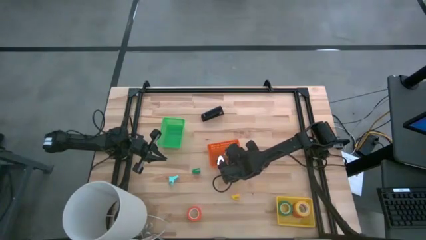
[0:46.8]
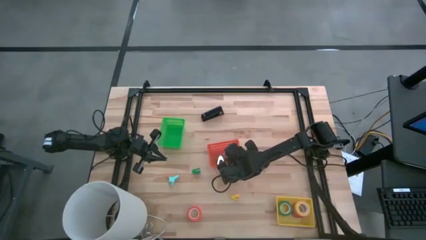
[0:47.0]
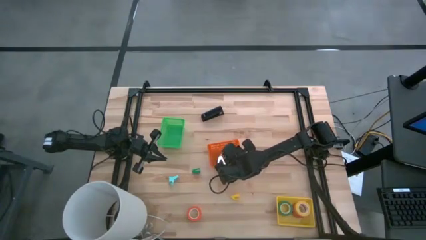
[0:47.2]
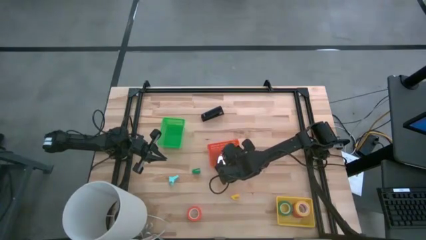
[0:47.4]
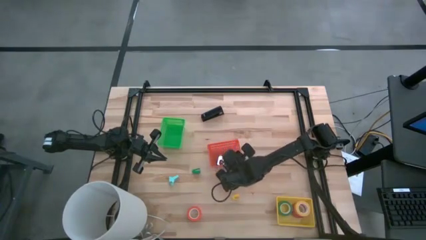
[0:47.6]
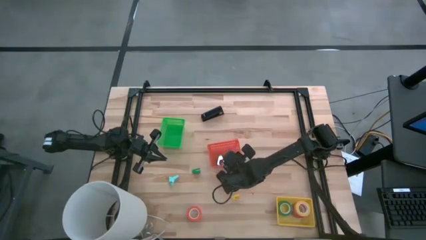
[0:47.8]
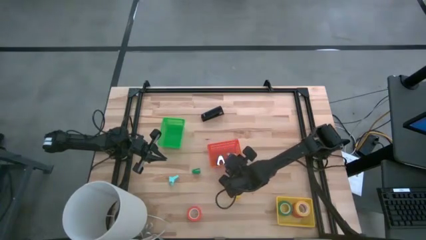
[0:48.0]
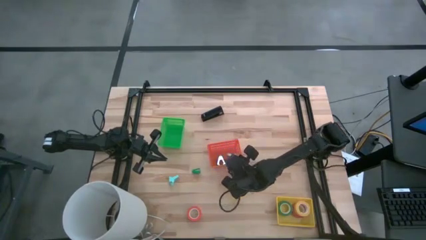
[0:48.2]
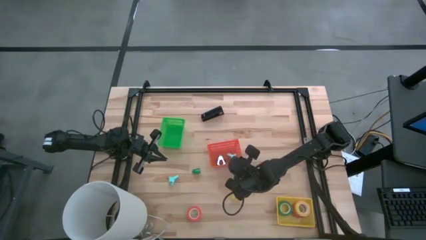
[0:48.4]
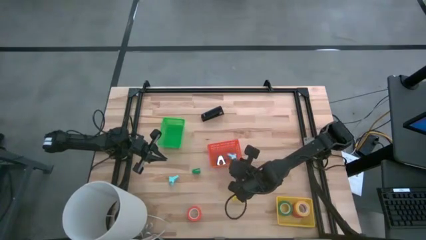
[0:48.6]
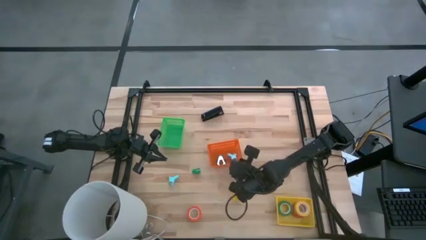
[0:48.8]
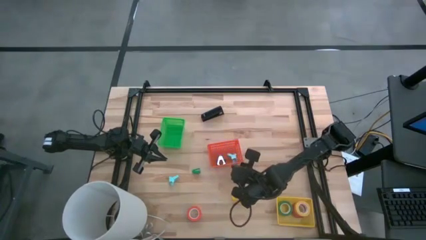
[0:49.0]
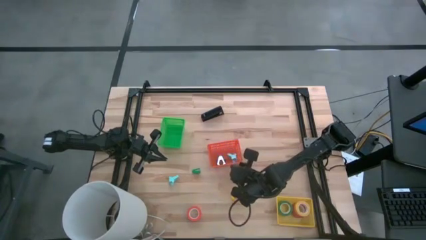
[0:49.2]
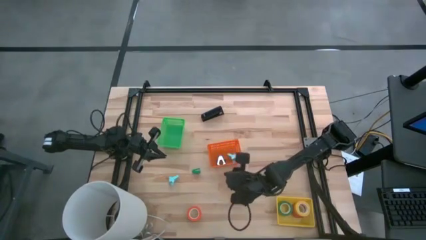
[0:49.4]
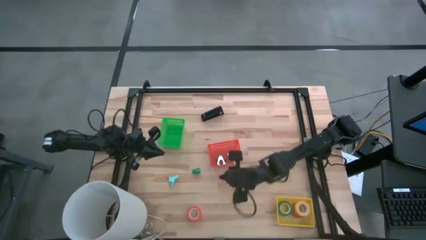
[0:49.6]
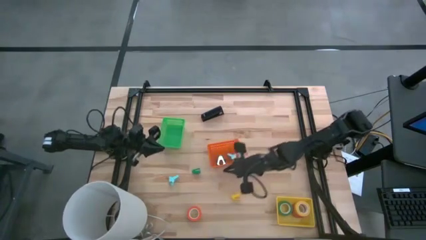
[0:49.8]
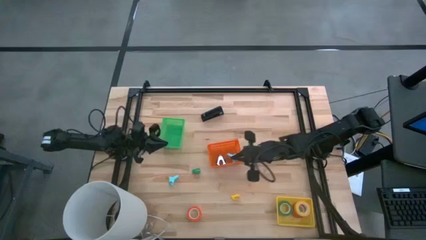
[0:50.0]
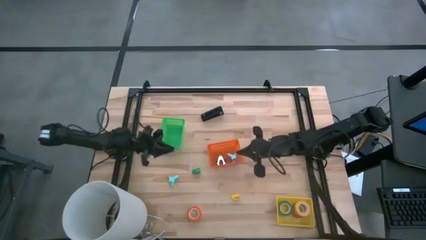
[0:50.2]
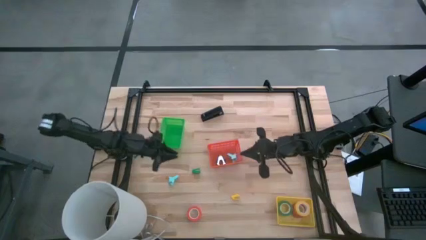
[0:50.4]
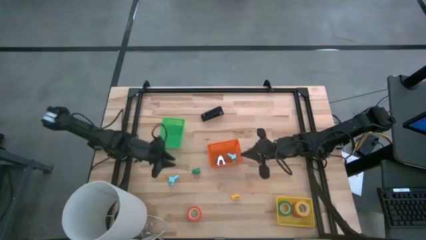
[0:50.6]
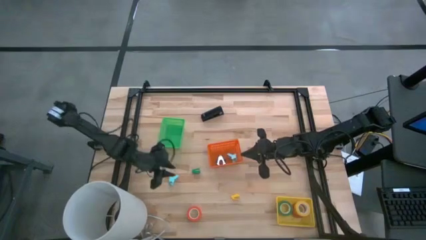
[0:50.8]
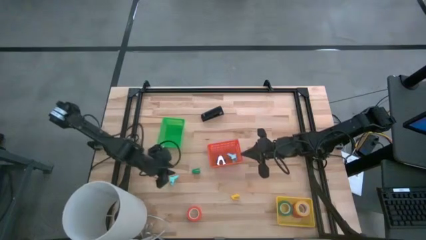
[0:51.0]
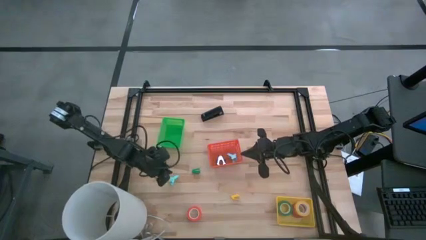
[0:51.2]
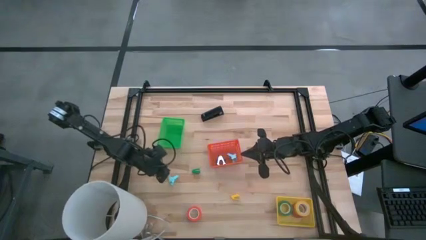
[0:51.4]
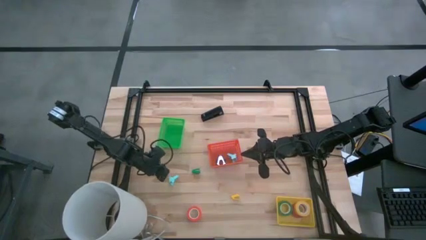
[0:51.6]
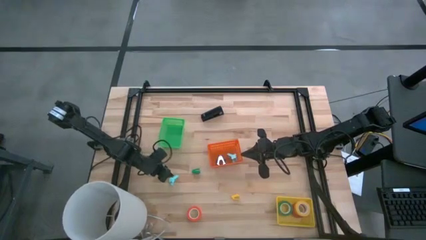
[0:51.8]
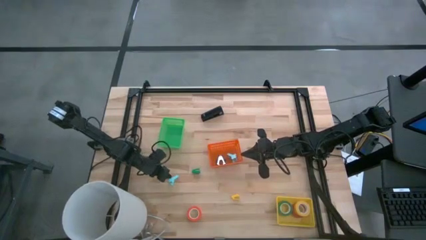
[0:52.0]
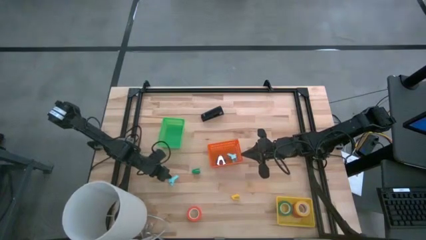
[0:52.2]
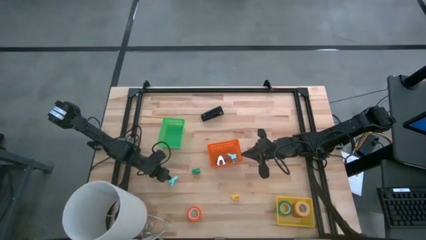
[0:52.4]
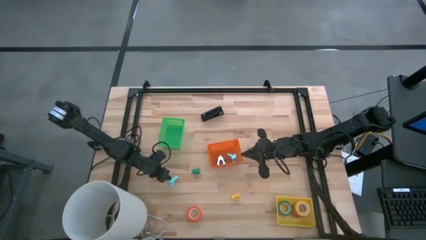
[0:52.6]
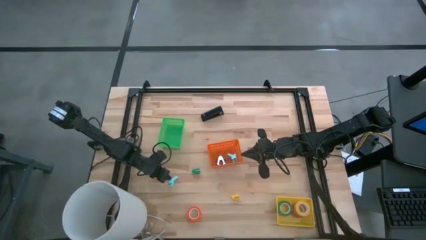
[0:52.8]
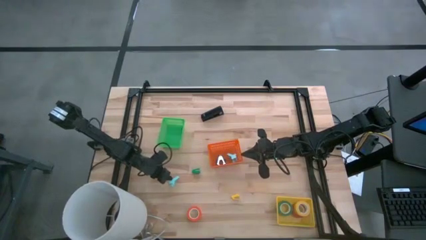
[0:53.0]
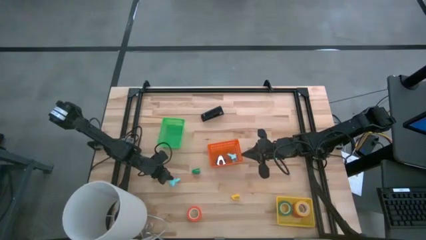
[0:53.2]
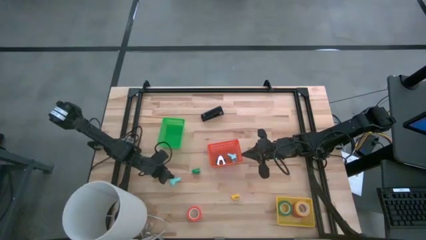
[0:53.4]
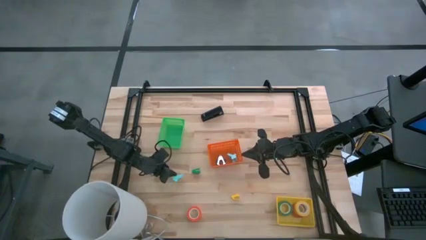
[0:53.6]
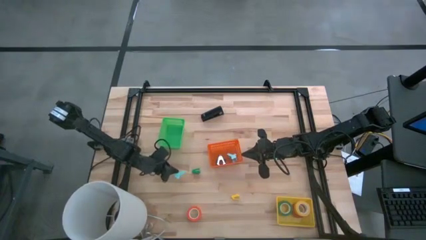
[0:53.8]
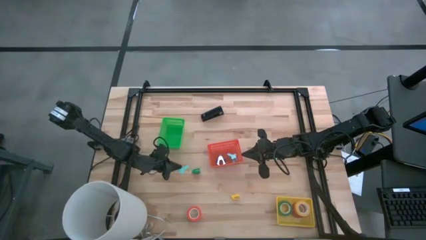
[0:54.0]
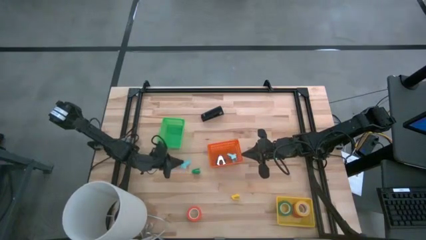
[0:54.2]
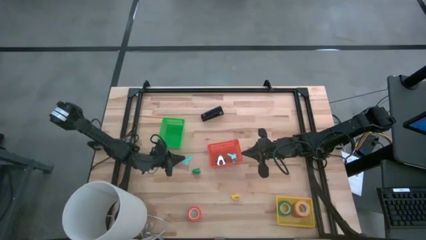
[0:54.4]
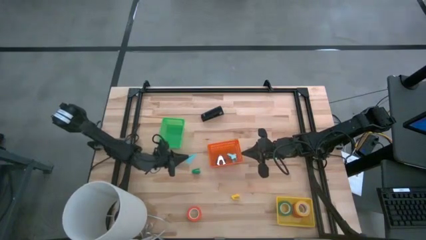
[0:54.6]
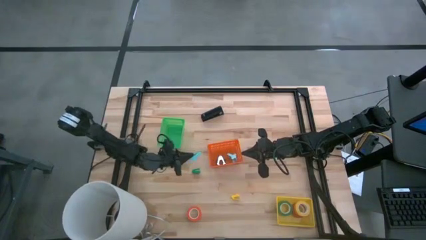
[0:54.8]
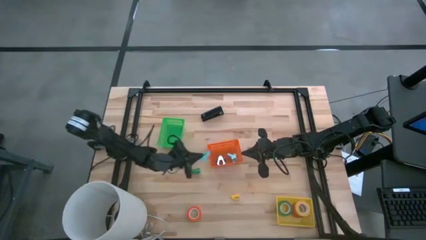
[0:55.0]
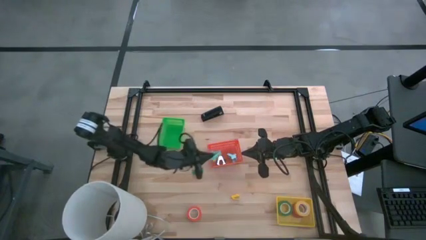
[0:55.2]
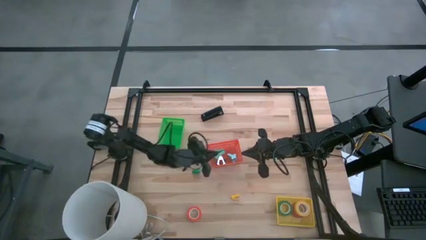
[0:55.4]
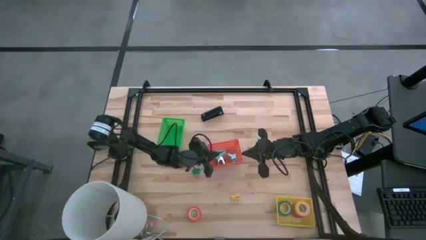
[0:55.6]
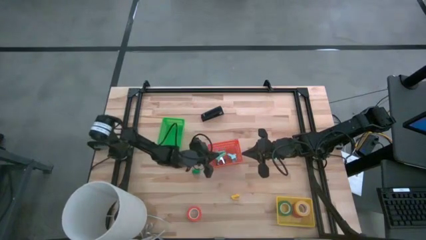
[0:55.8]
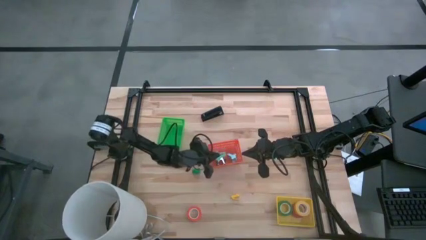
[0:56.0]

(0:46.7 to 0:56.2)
Task: Pick and place Stapler, Stapler remover, tape
Put the blue staple remover into the orange bin

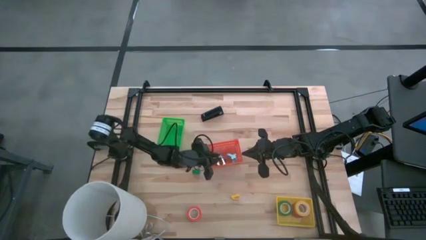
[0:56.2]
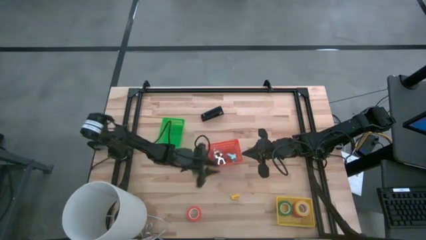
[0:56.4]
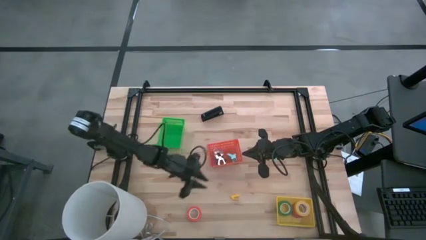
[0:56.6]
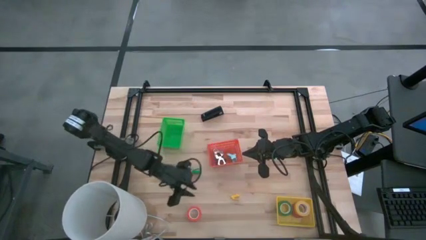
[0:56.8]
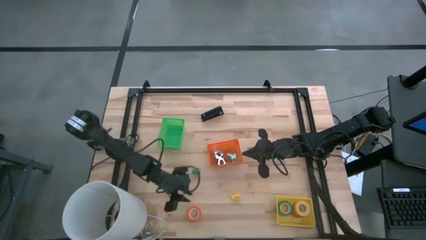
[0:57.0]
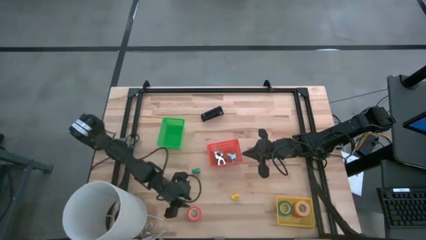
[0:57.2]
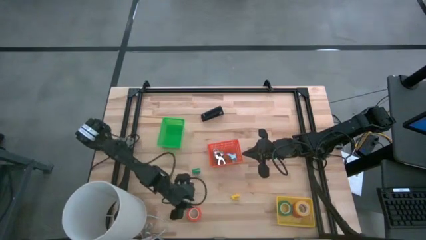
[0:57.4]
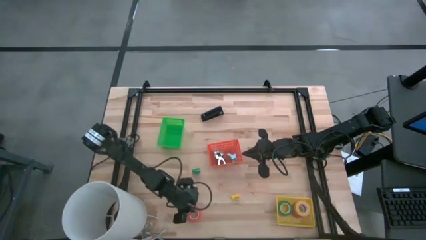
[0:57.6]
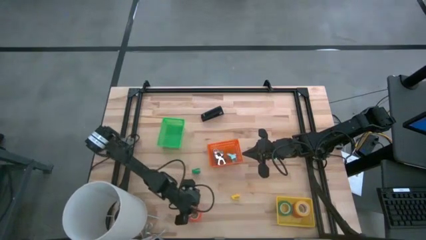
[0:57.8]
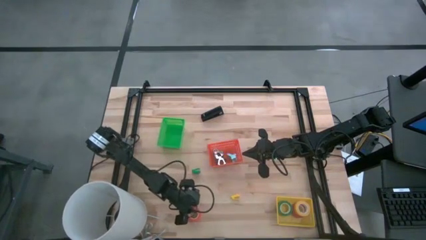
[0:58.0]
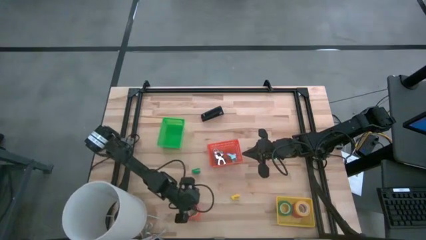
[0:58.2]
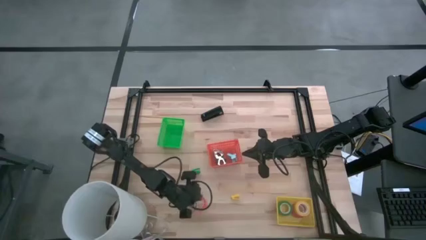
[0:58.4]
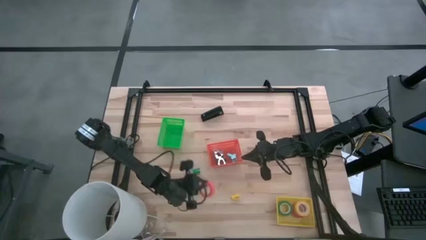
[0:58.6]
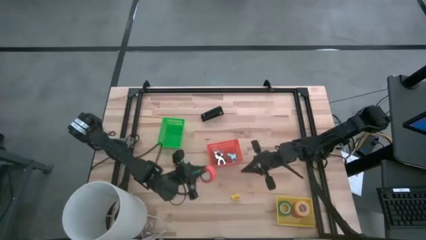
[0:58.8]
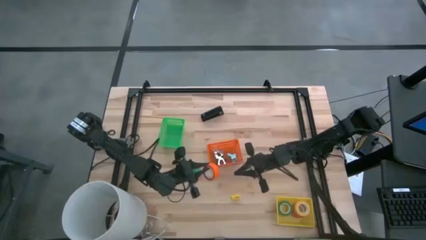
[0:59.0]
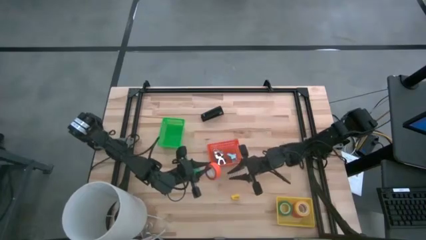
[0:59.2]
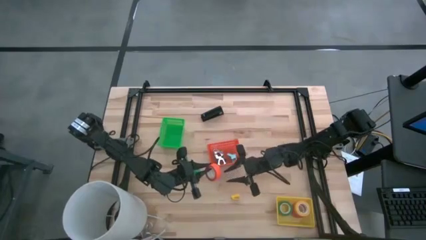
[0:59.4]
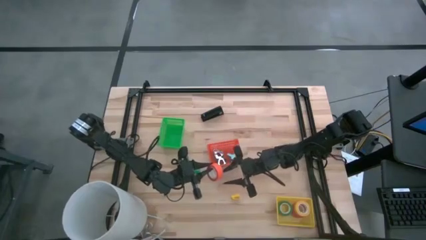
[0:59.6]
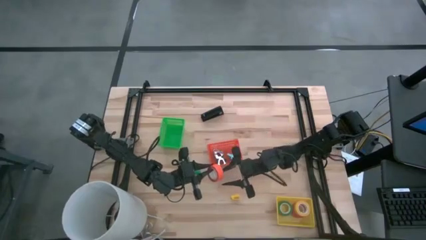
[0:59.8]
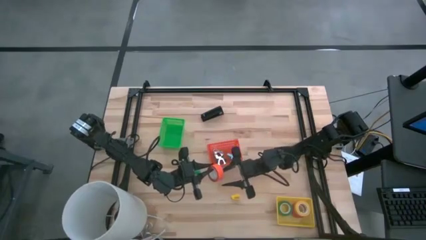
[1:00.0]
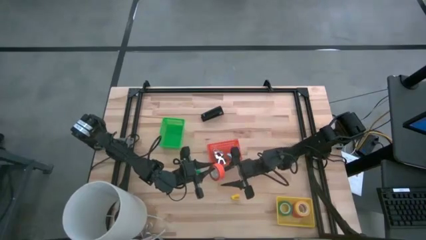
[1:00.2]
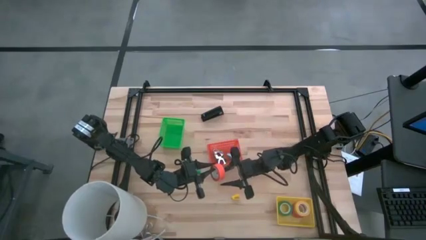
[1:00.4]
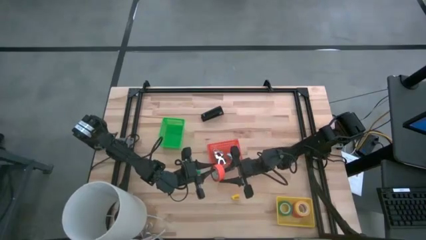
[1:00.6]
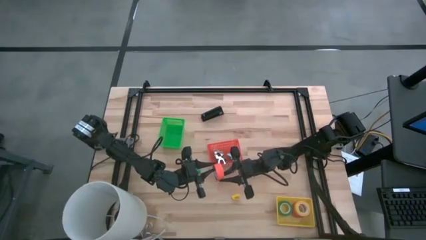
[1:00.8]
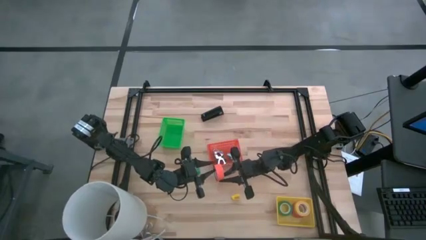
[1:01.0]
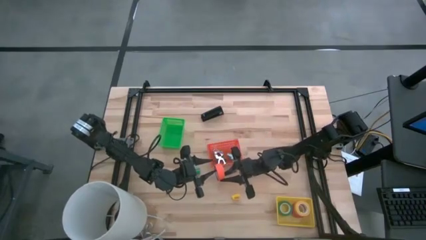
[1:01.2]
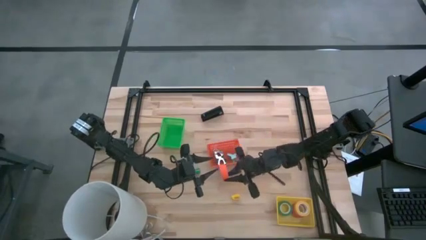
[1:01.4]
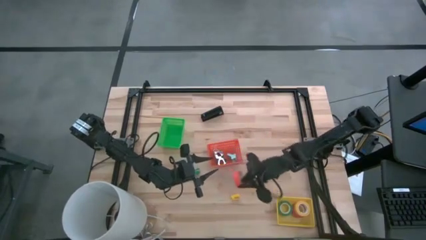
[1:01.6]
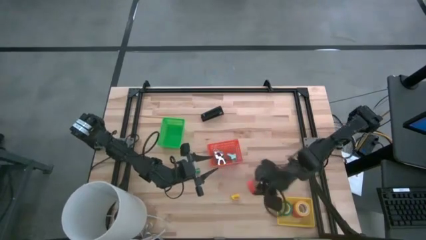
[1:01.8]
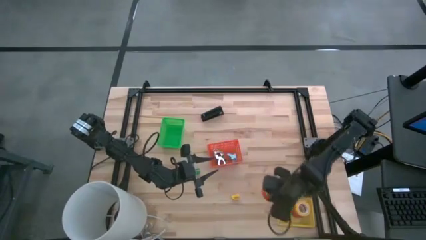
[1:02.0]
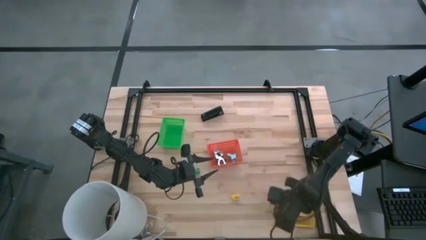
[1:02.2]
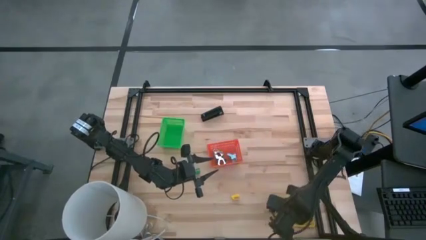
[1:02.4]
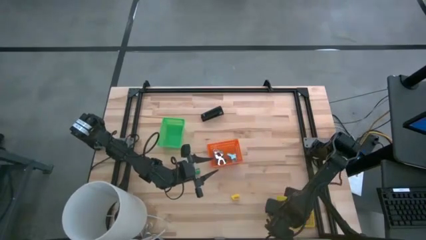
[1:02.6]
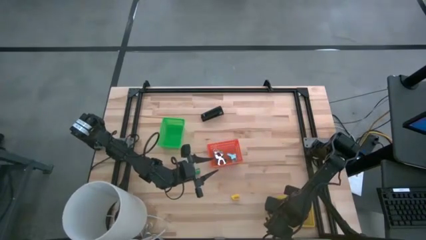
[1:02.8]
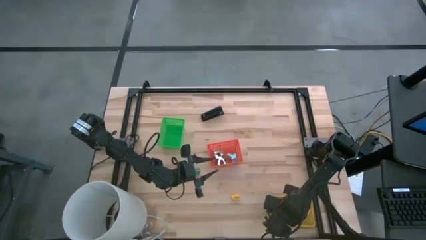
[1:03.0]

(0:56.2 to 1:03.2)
Put the orange tape into the yellow bin
